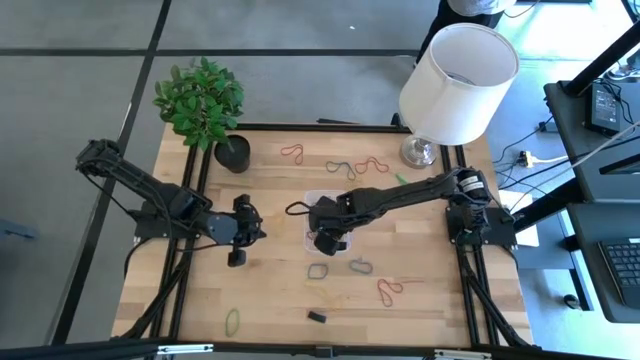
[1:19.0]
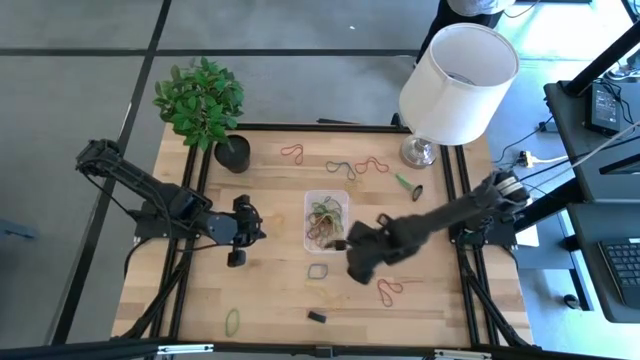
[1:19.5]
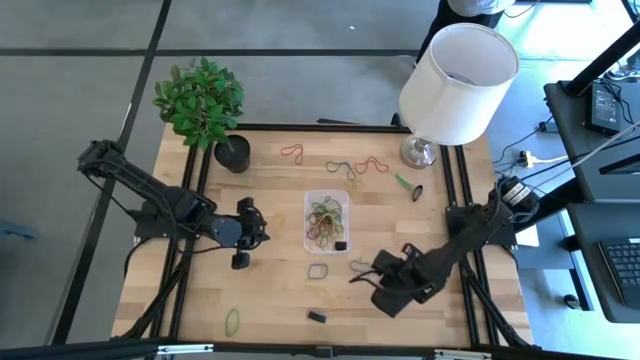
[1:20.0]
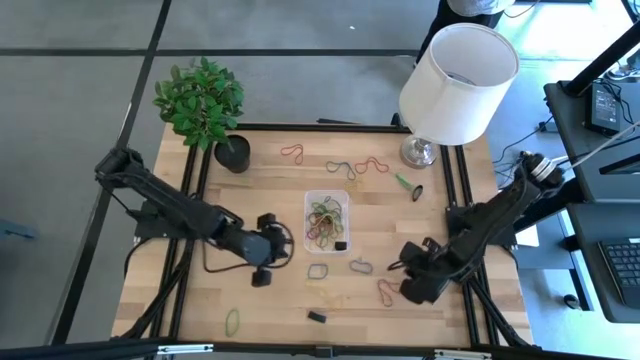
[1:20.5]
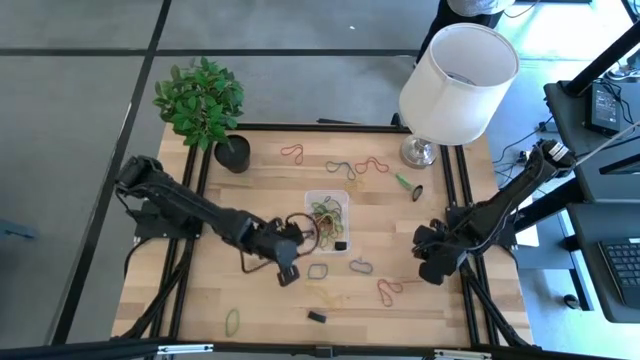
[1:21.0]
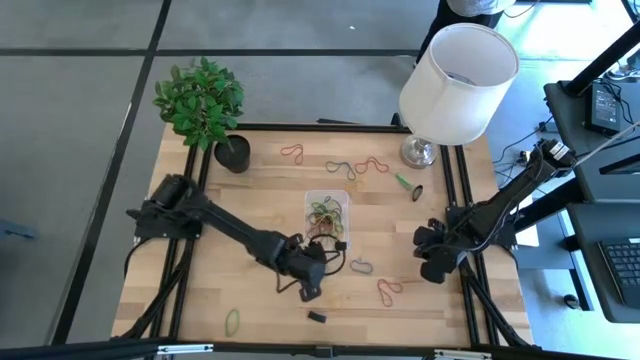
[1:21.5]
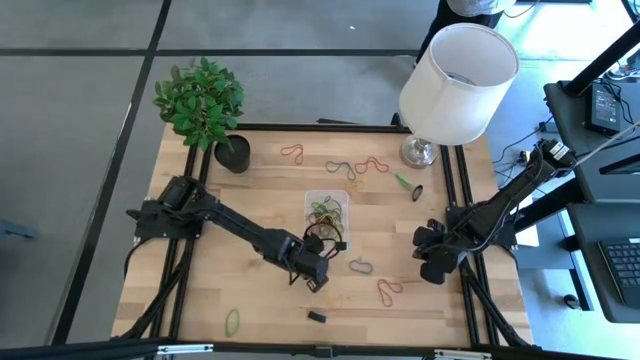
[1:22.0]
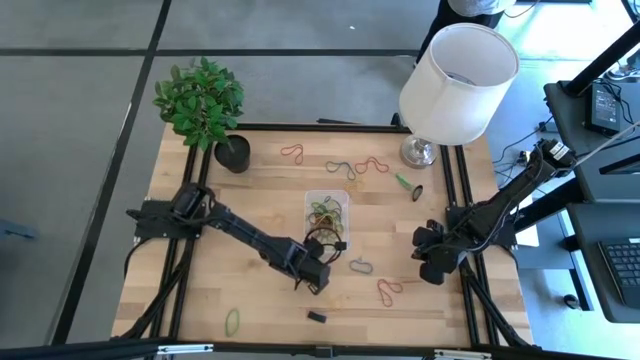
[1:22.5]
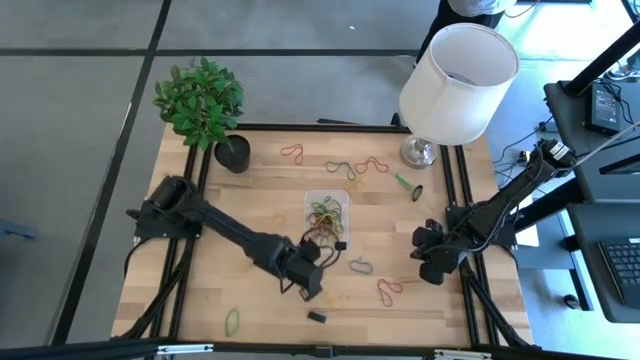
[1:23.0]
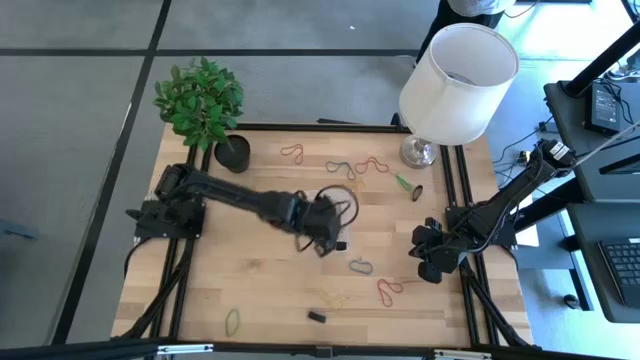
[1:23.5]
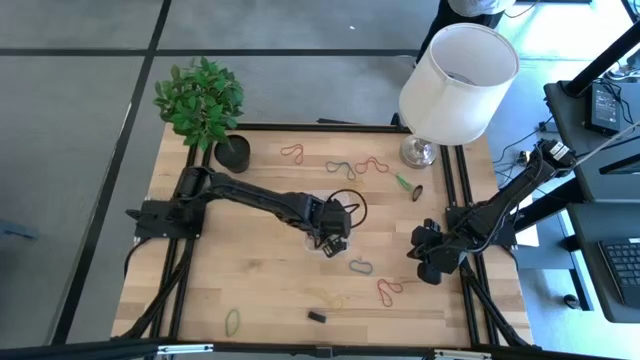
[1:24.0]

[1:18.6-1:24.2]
Task: Pick and place rubber bands into bin
Put the blue rubber band into the transparent container

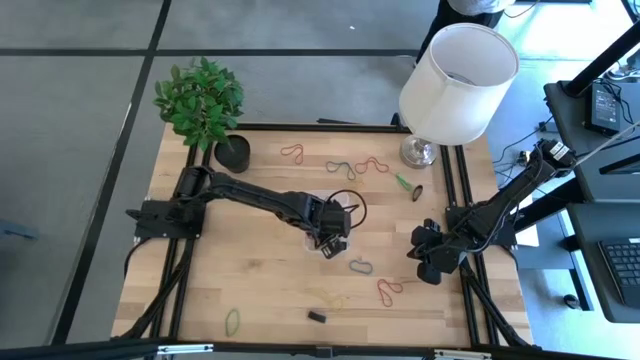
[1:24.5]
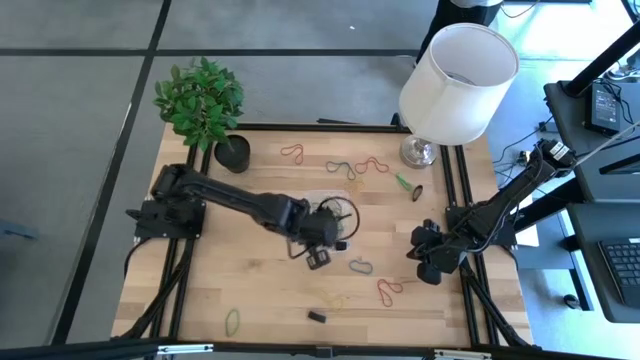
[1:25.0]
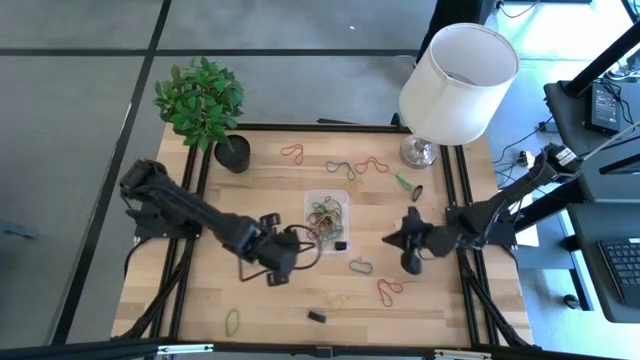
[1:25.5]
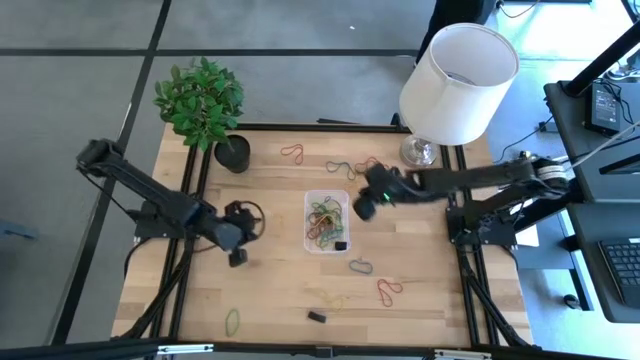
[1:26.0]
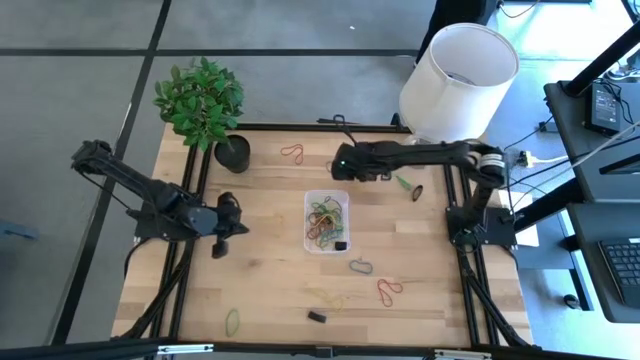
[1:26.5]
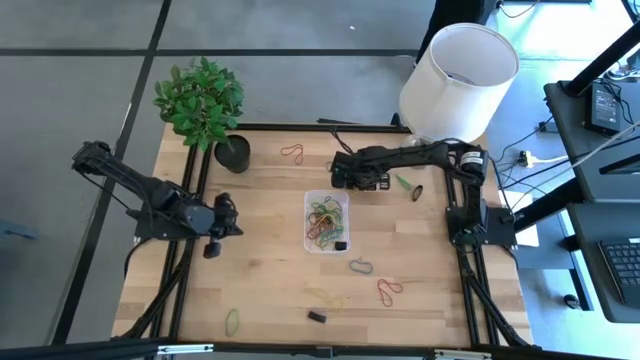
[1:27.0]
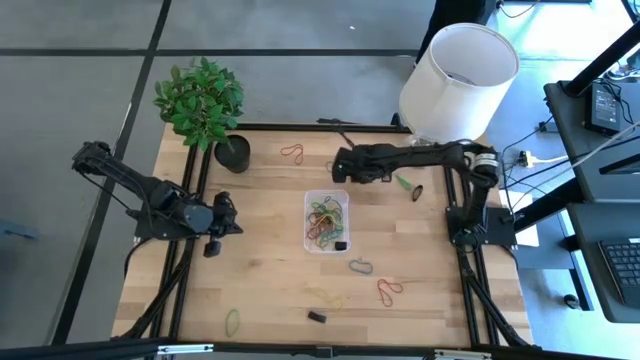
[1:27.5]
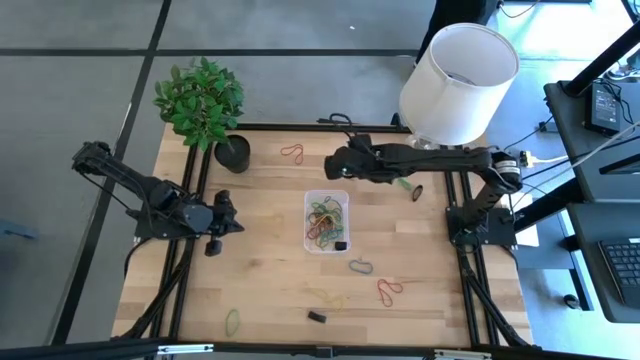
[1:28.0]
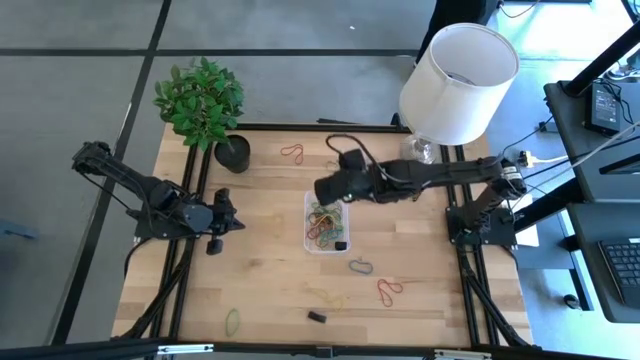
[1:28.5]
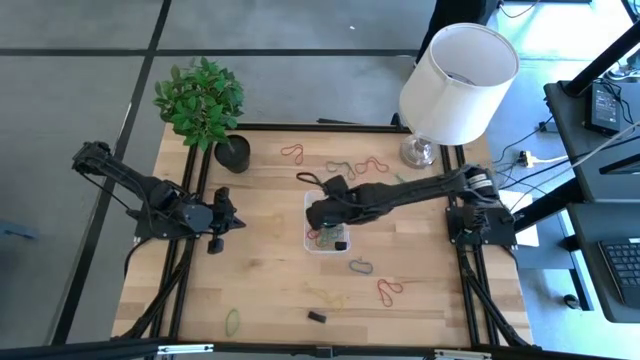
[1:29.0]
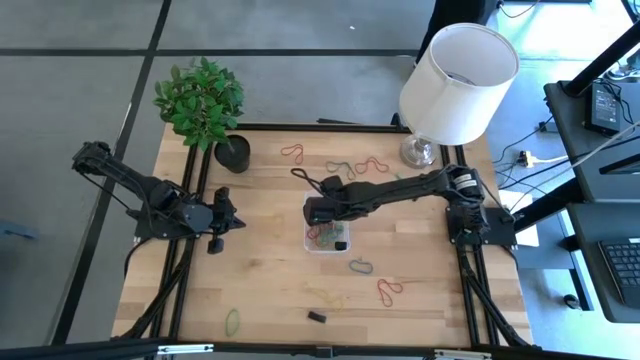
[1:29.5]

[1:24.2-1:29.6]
Put the yellow rubber band into the transparent container

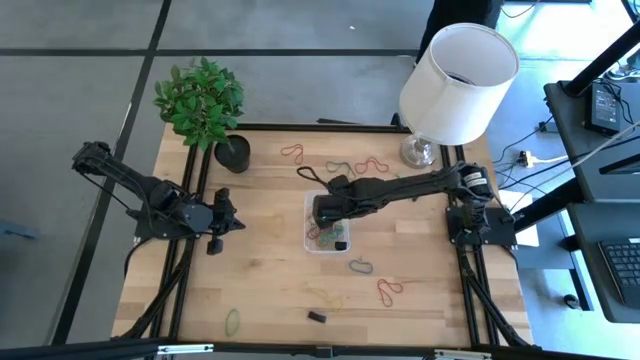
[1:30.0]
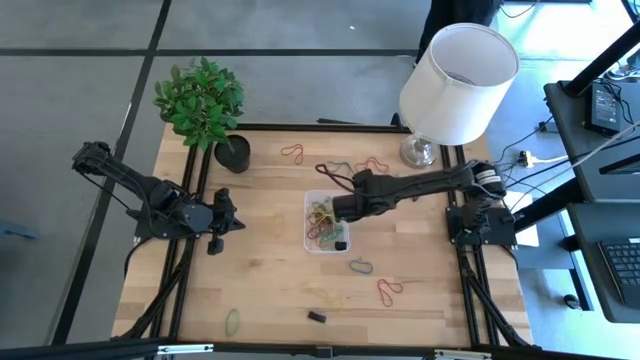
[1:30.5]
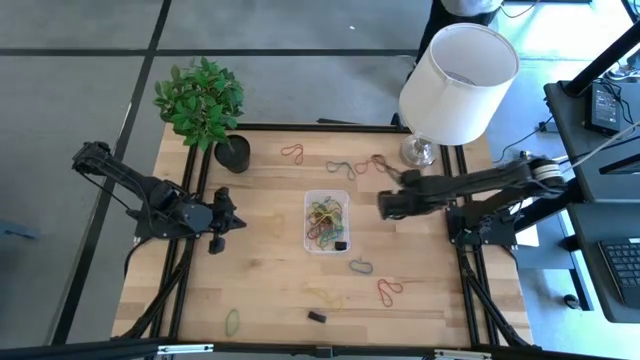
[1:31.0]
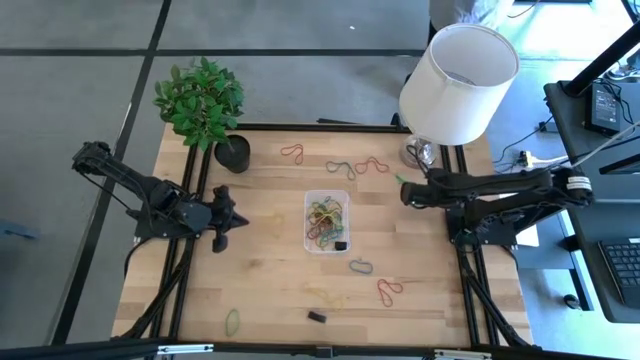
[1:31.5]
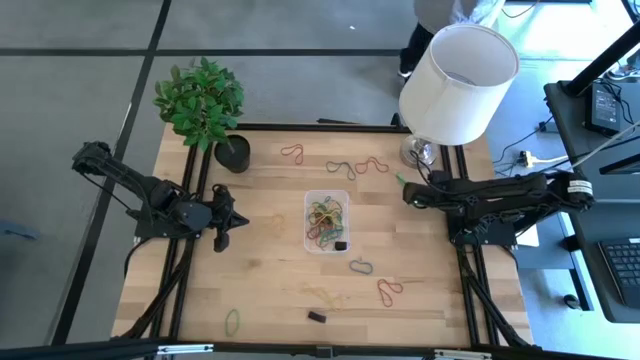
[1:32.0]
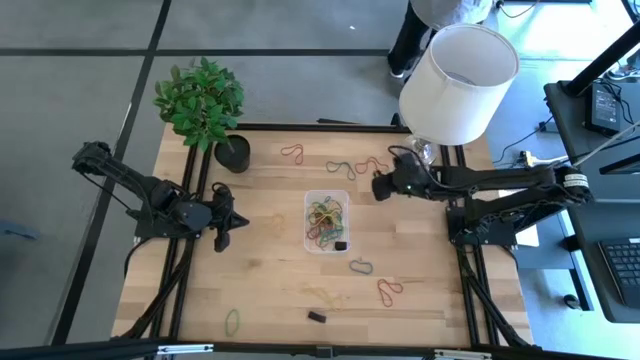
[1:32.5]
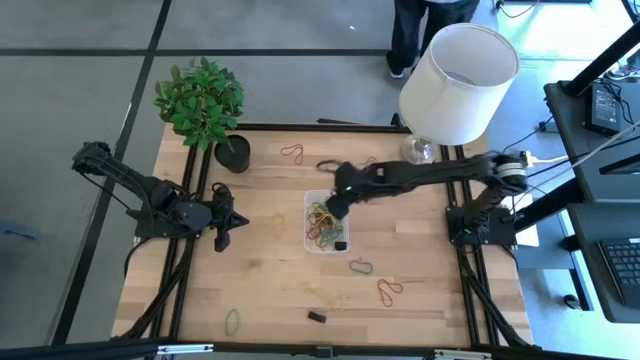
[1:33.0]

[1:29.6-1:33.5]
Put the black rubber band into the transparent container

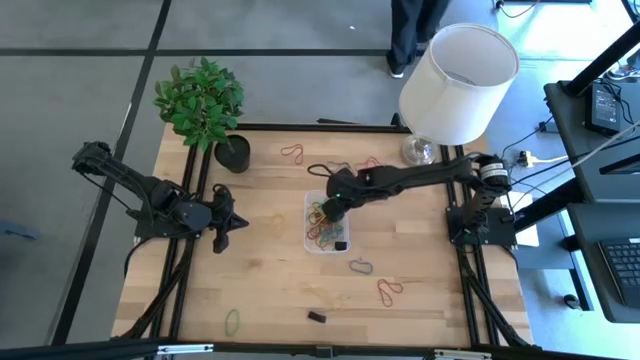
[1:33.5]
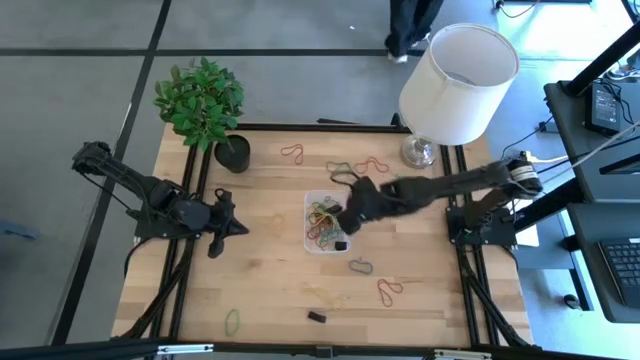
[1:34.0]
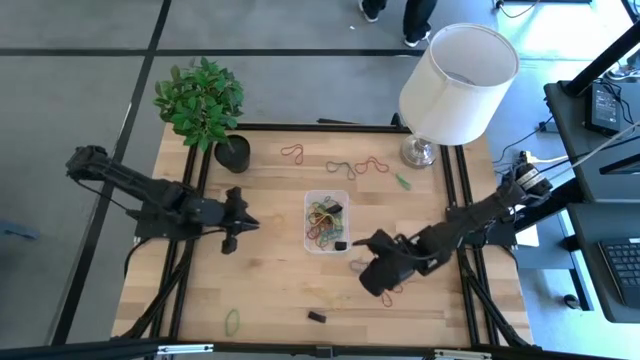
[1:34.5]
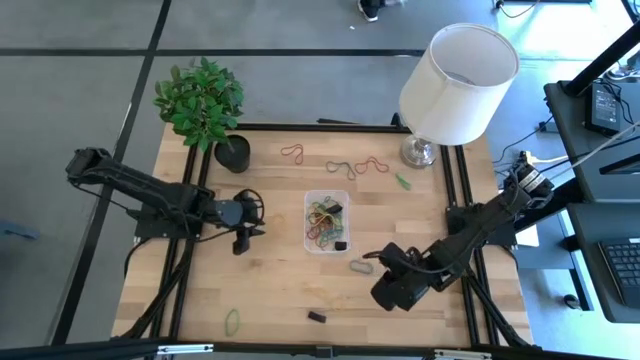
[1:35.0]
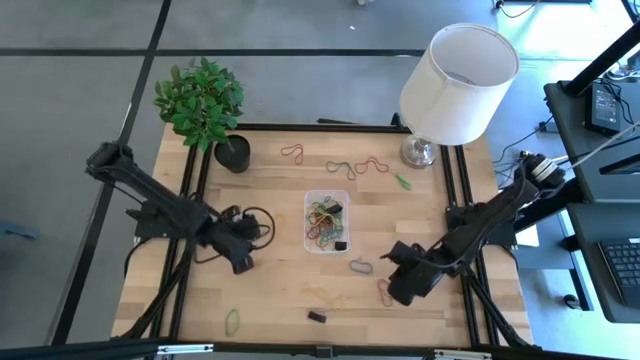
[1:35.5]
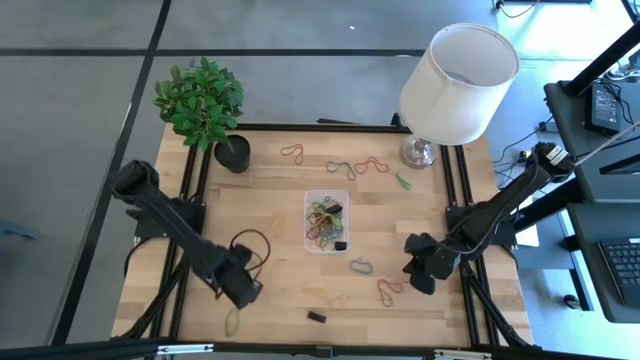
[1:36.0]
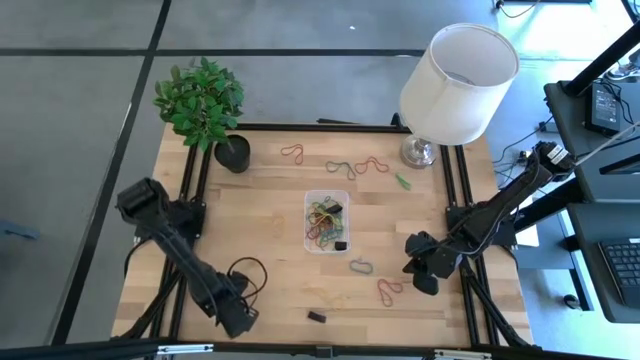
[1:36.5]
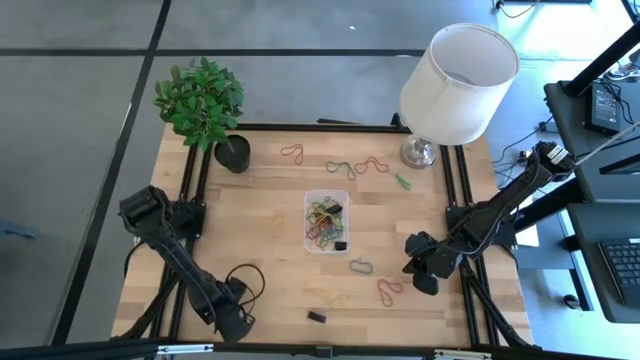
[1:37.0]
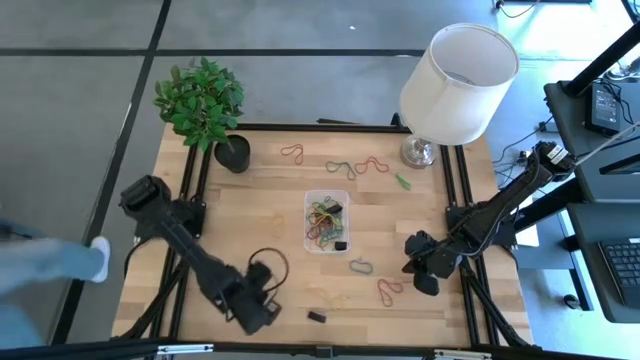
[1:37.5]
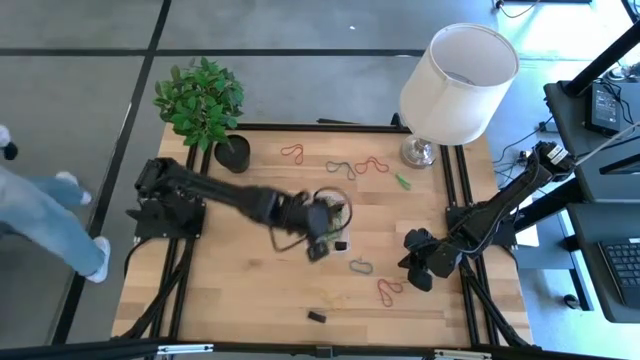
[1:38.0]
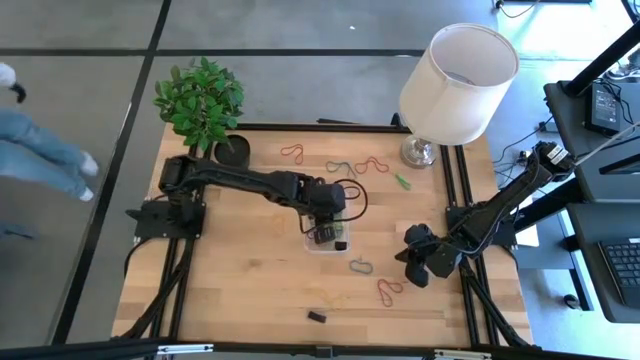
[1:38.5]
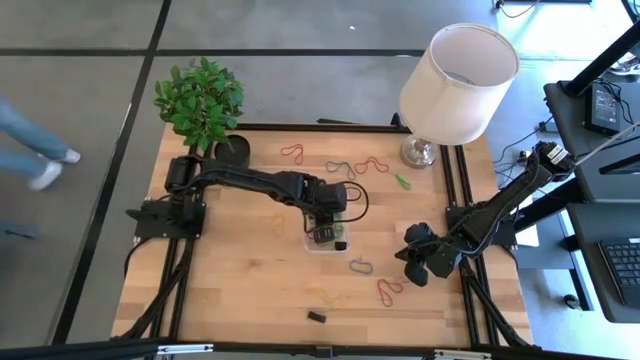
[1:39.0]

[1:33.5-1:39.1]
Put the green rubber band into the transparent container

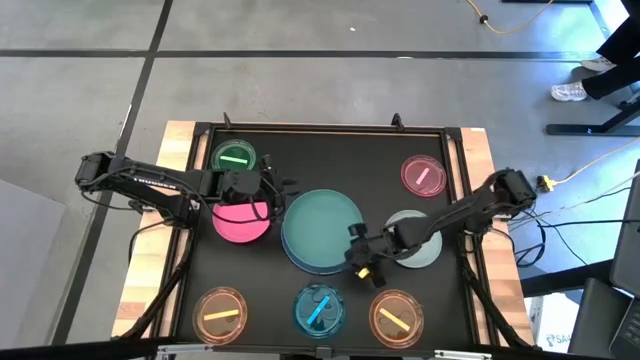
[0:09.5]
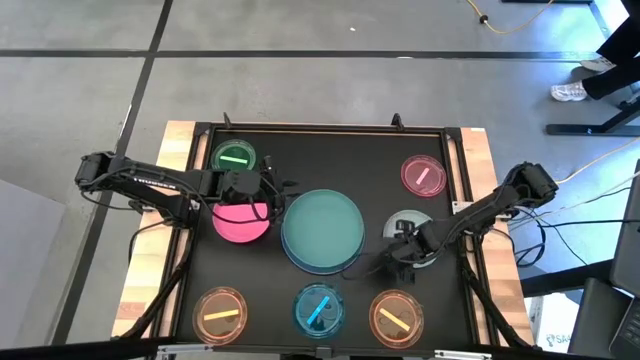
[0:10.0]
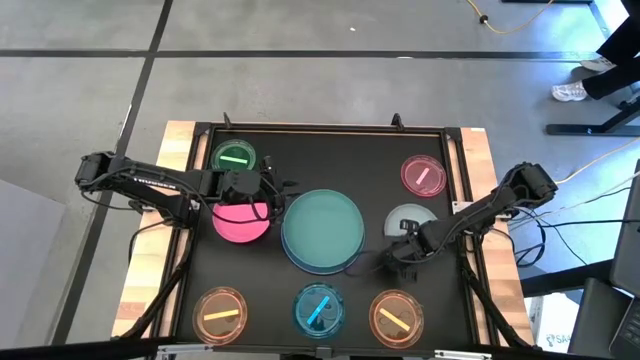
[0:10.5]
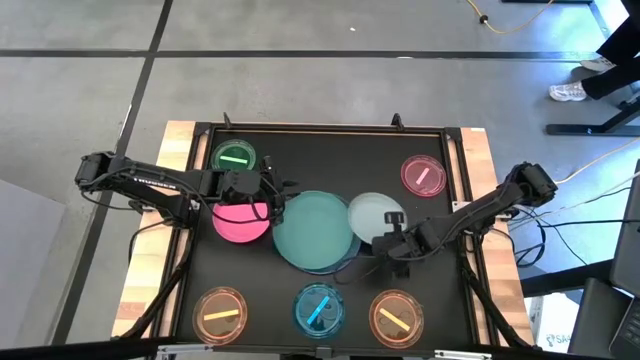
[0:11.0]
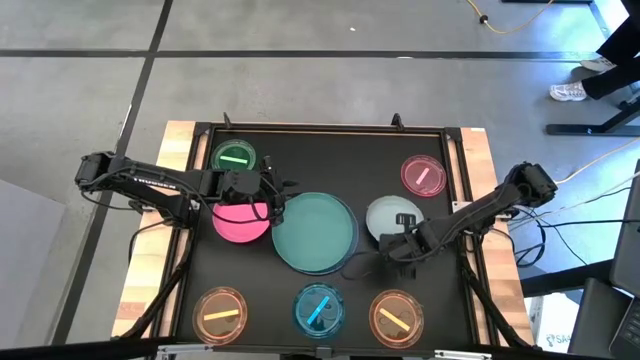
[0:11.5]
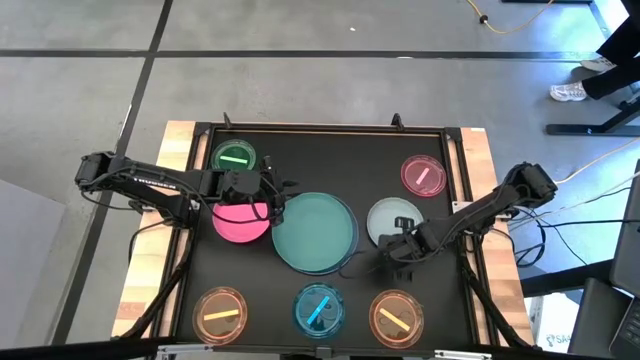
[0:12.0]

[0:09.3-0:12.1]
Task: Stack plastic plates
Stack the gray plate on top of the green plate
